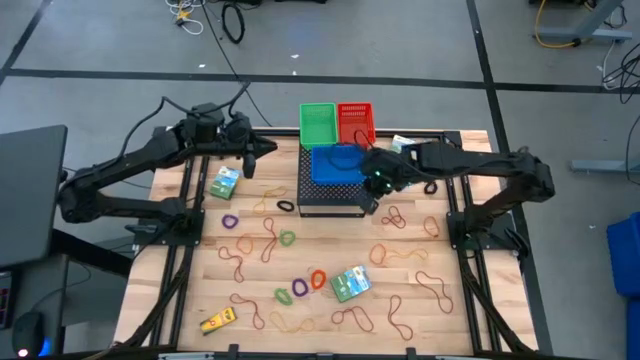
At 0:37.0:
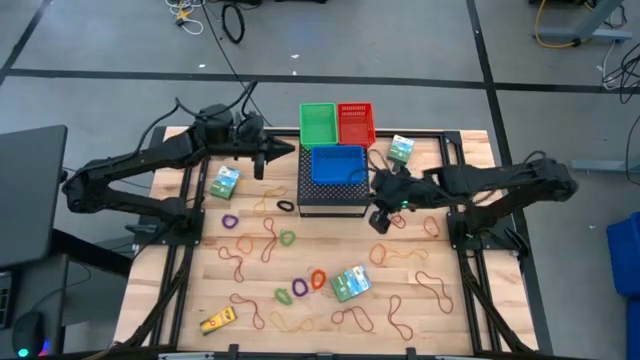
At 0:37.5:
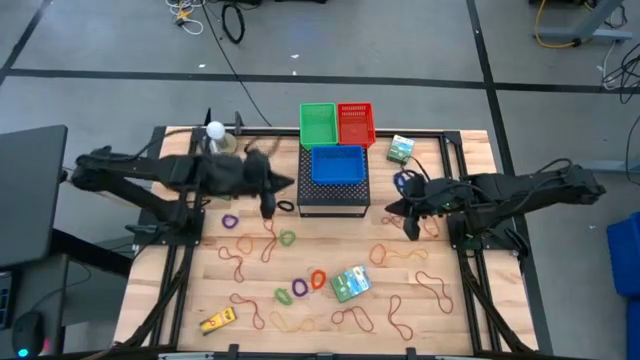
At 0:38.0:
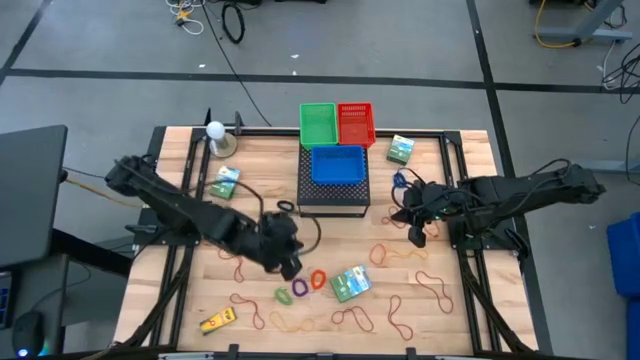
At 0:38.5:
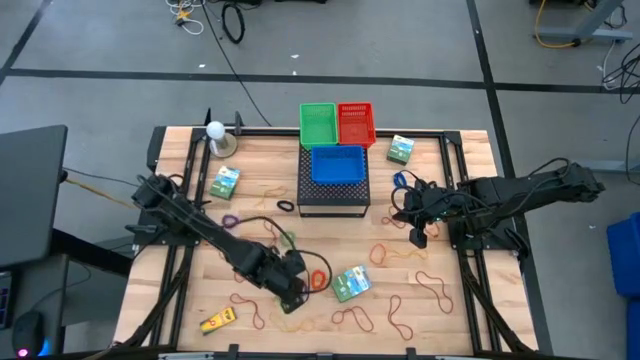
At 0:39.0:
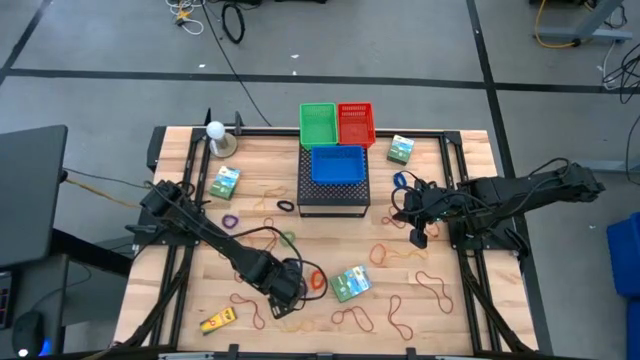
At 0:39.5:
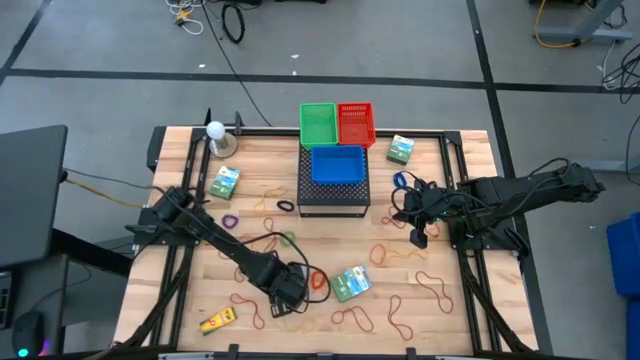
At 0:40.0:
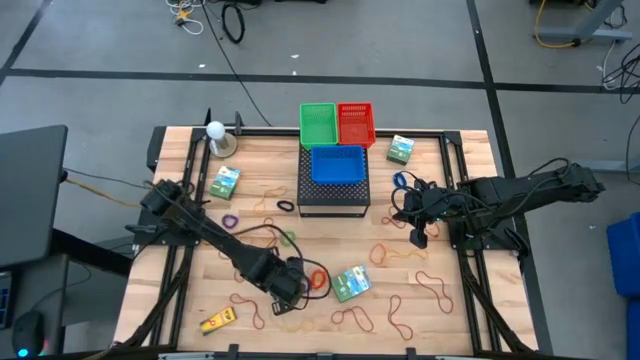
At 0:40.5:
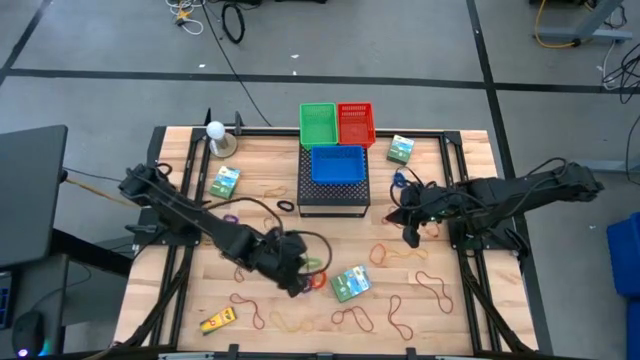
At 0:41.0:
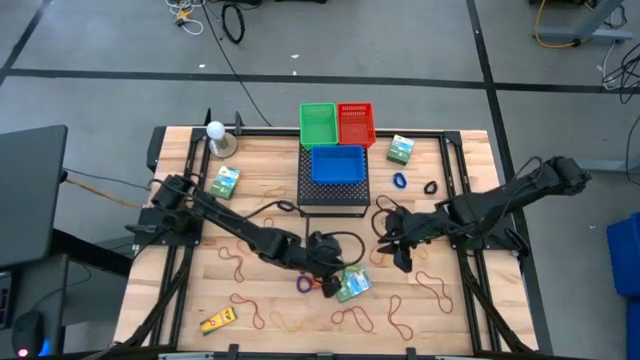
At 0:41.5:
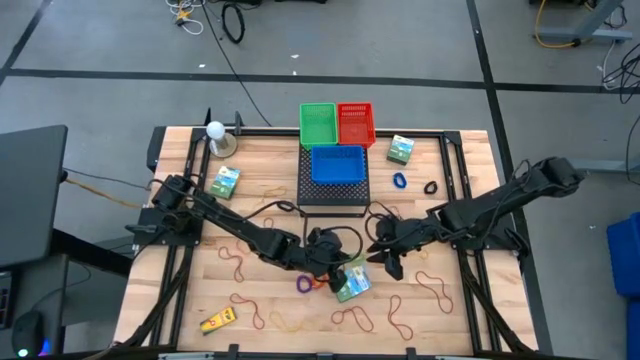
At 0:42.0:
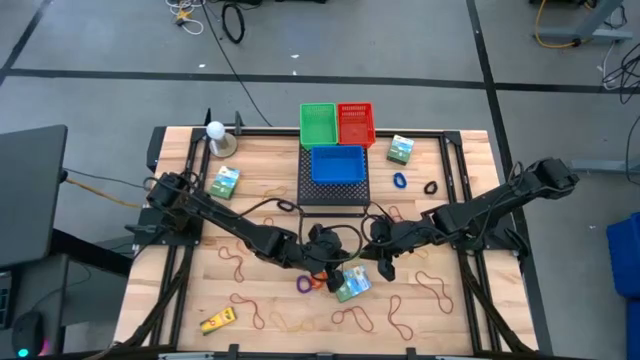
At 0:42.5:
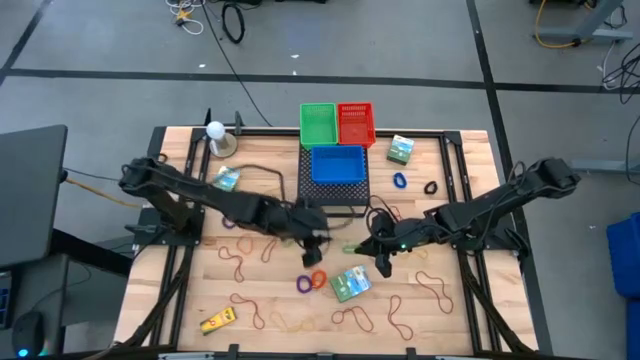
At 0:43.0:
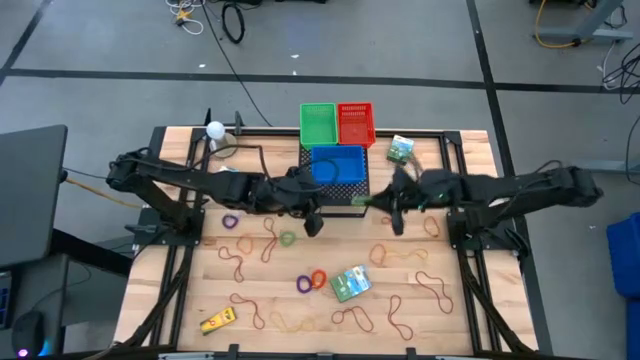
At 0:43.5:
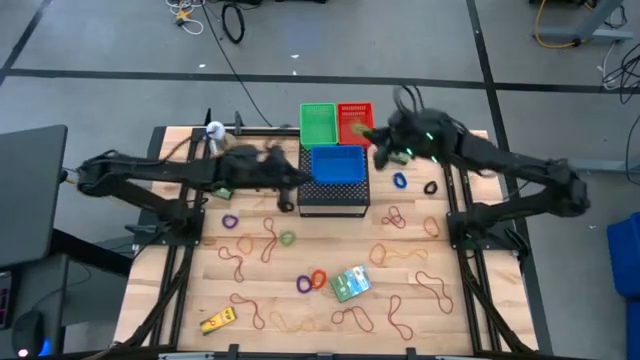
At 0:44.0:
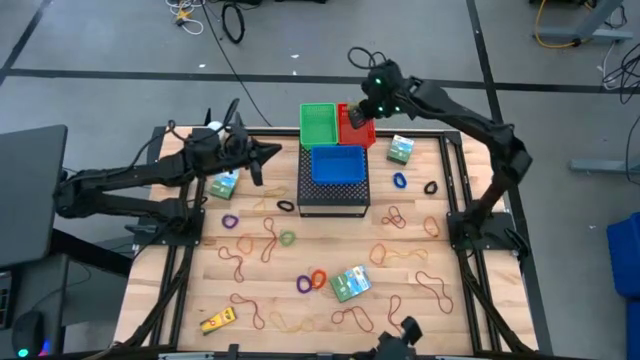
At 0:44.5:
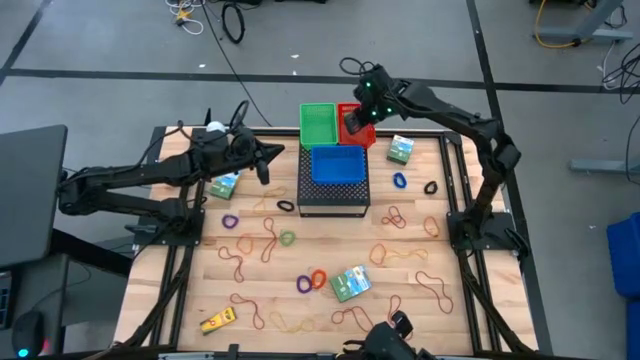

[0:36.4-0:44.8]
Task: Pick & Place Office Desk Supplies
Put the green spring keychain into the red bin on the shelf

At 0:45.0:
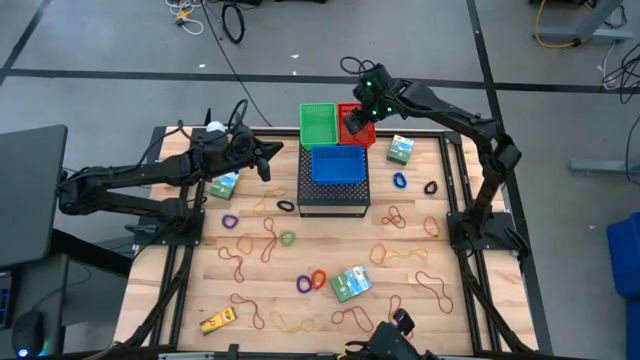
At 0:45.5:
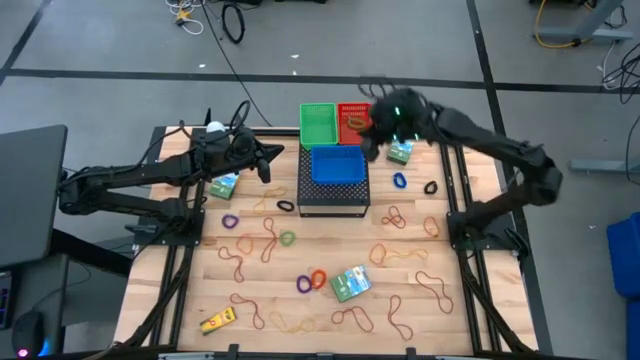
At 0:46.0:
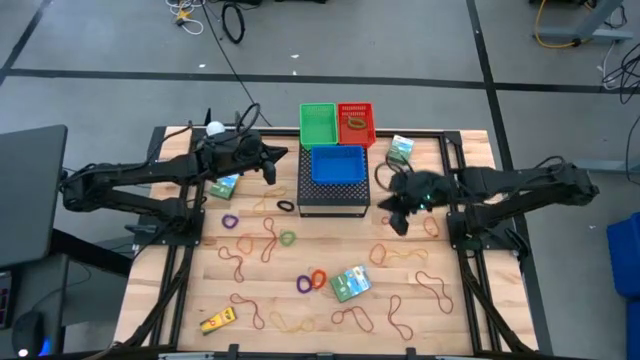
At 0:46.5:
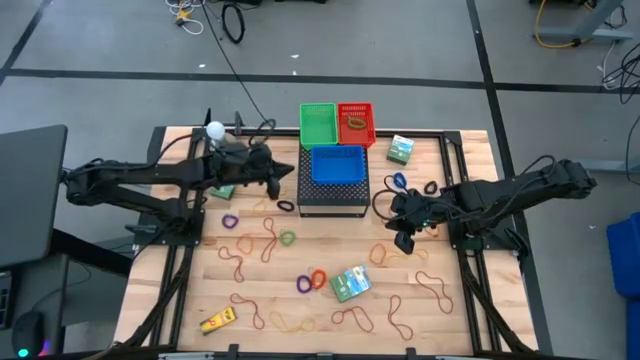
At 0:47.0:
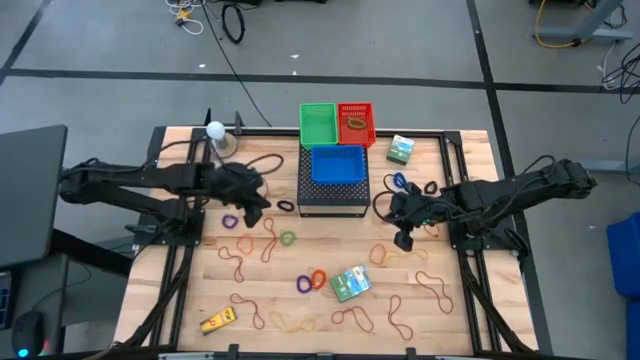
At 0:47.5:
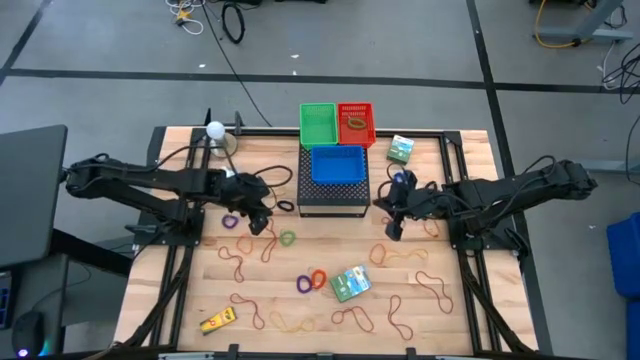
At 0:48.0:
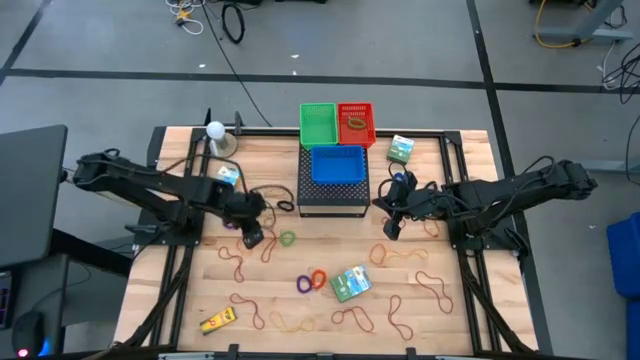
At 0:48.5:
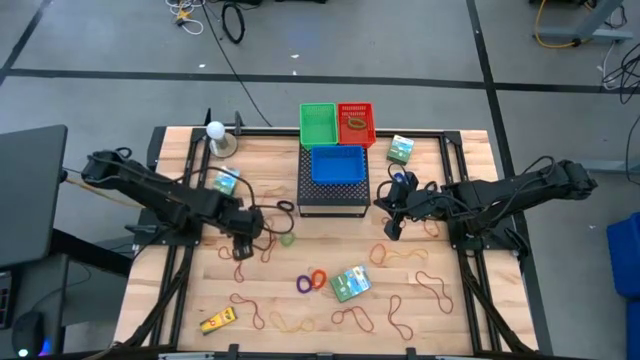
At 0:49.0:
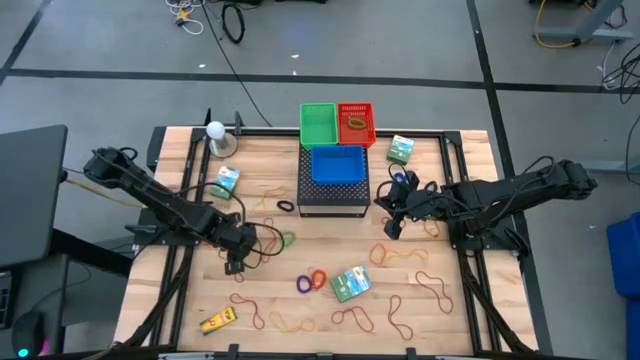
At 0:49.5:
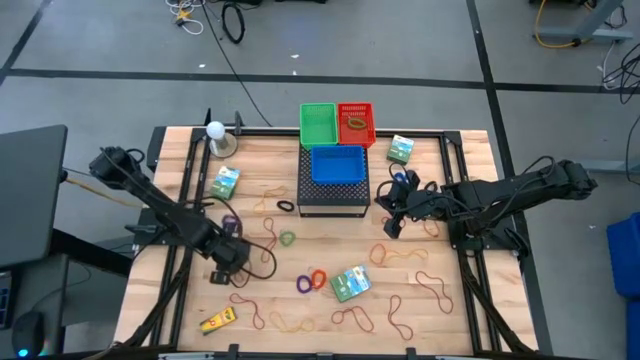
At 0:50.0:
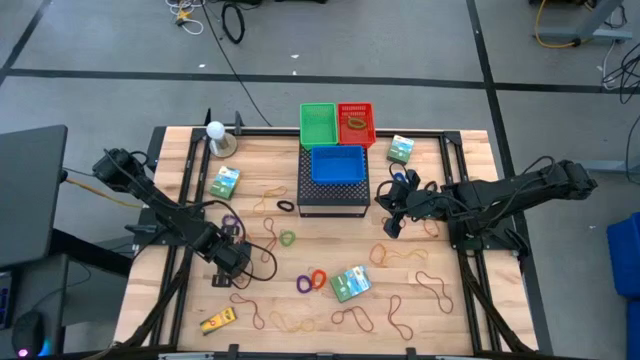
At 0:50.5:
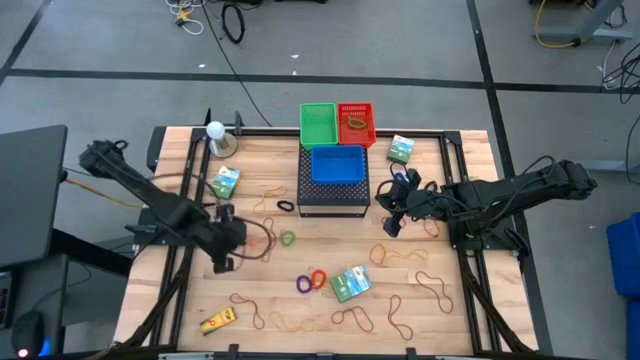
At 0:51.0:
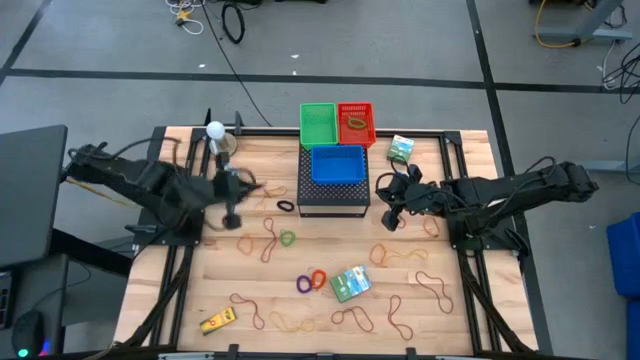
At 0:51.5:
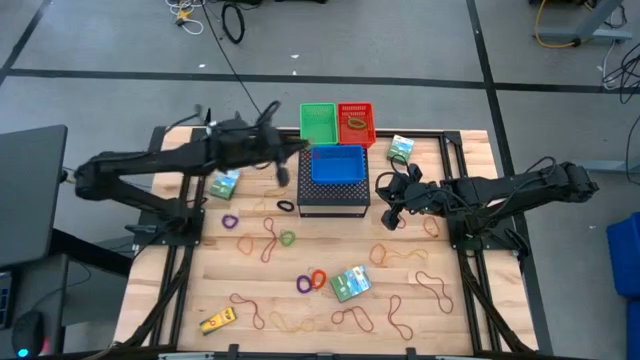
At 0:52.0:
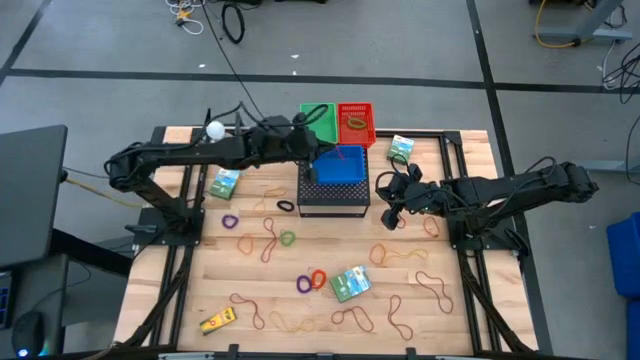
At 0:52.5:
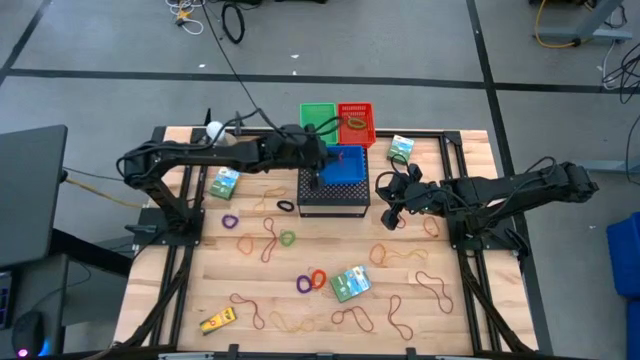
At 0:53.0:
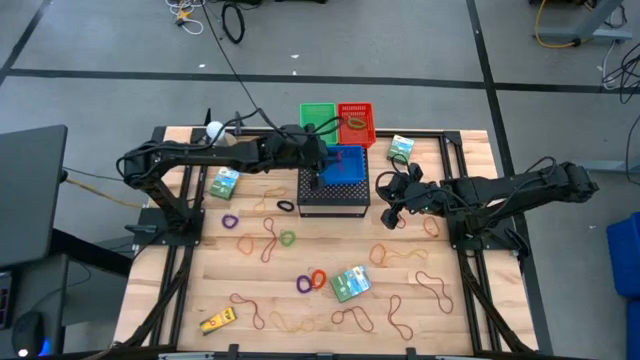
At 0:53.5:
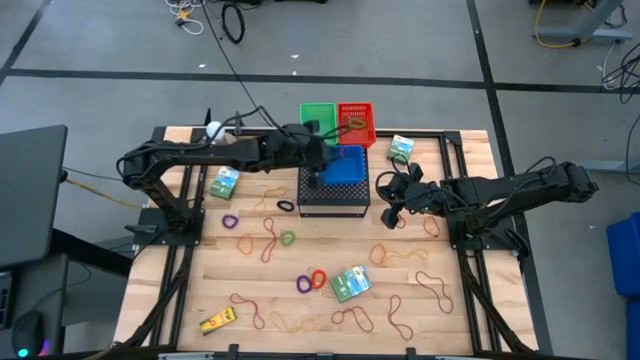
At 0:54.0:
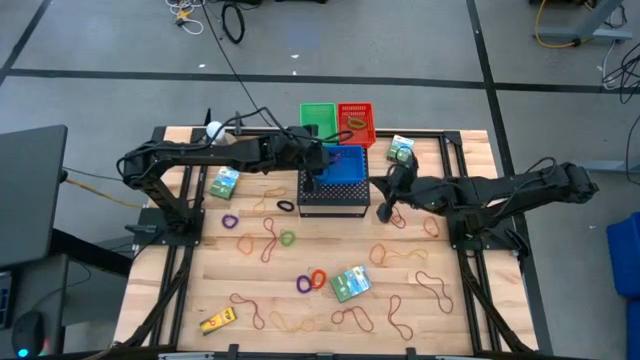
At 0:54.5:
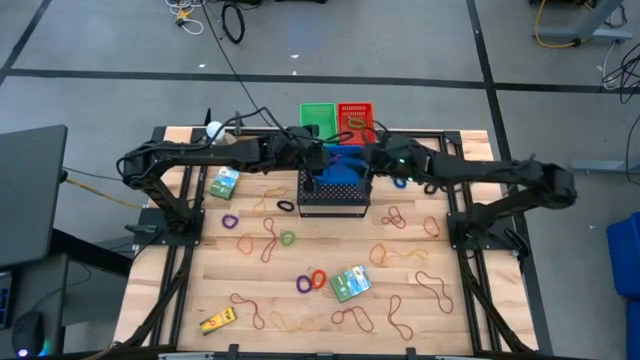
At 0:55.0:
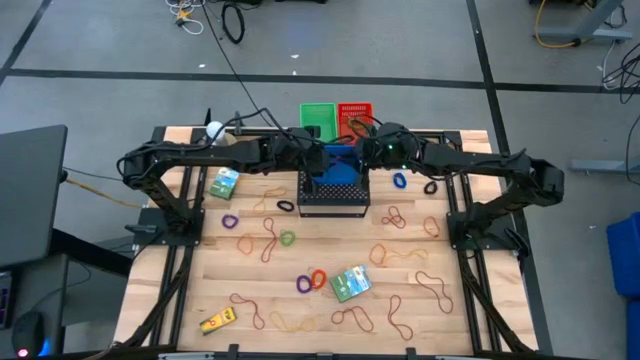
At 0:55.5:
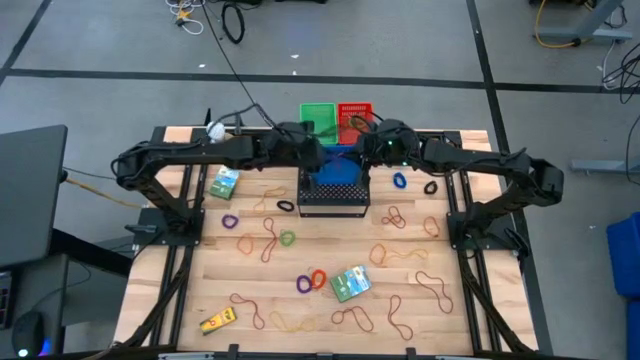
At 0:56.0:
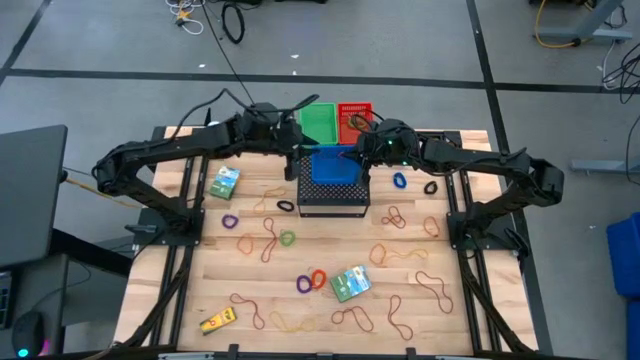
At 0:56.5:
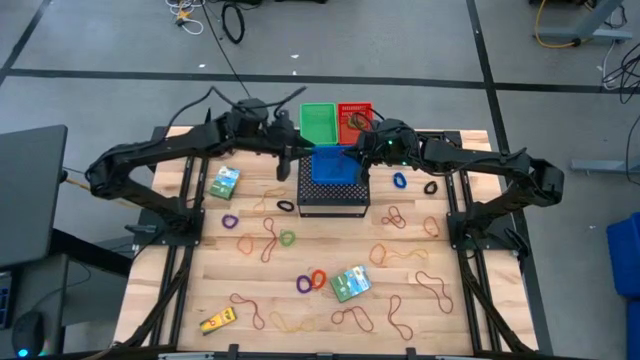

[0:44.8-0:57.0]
Put the red rubber band into the blue bin on the shelf

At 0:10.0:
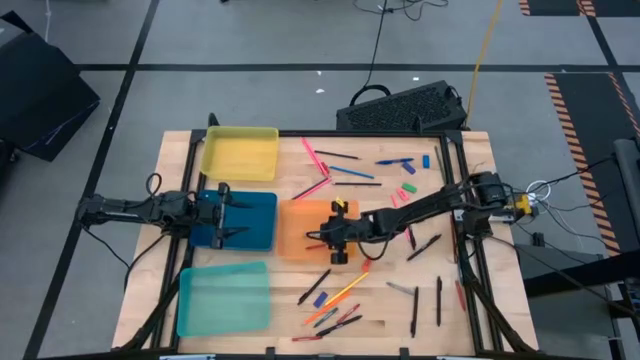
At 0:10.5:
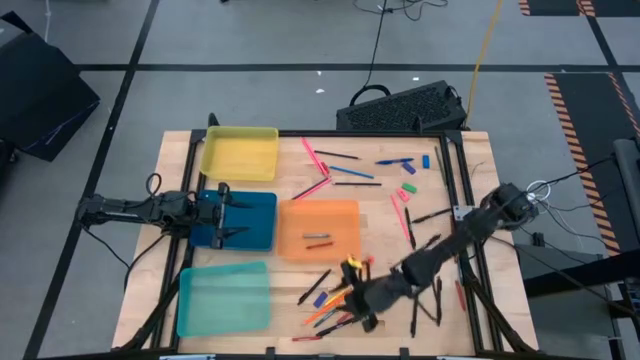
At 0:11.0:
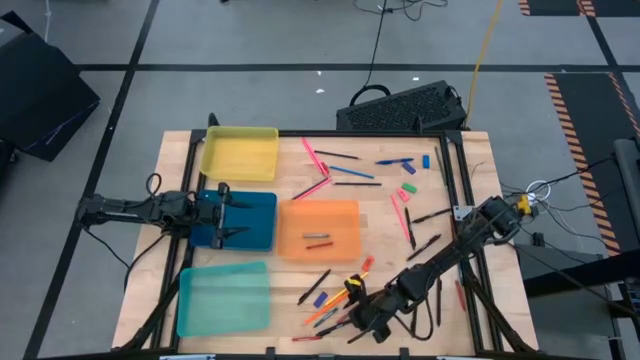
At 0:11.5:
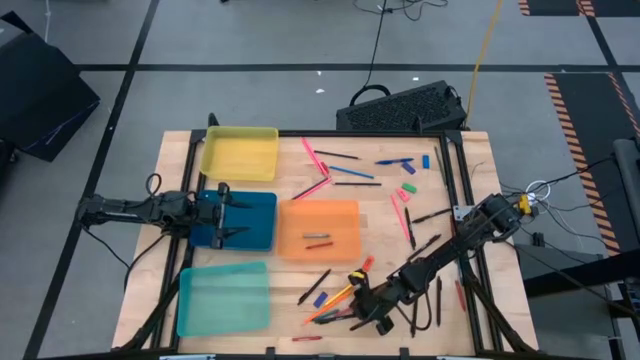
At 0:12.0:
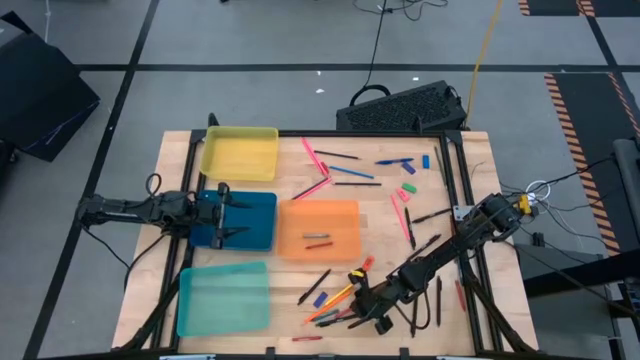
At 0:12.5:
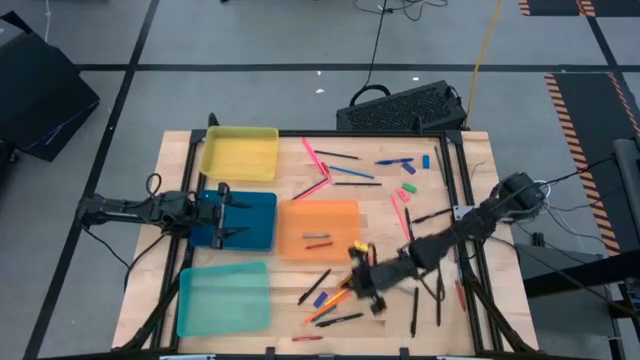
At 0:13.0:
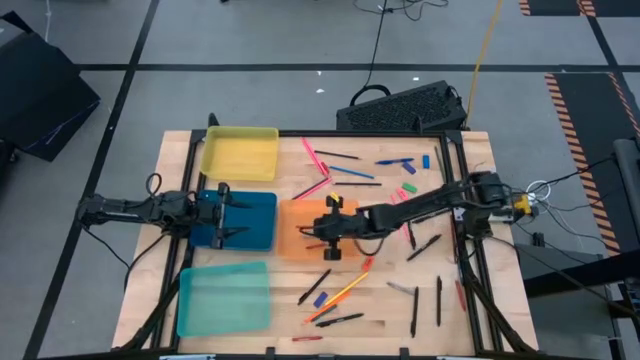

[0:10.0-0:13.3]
Task: Sort crayons/erasers/pens/pencils in bins
Put the red crayon into the orange bin
